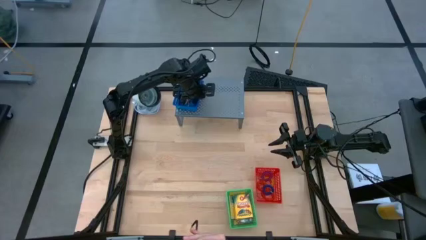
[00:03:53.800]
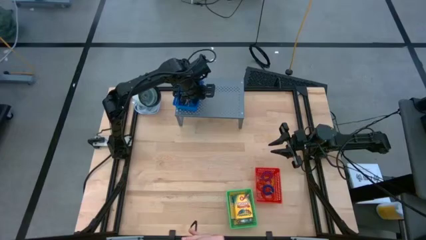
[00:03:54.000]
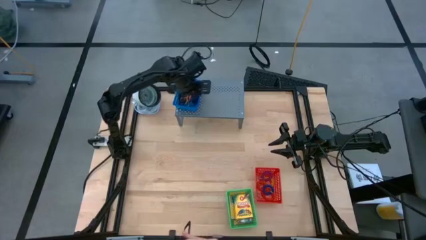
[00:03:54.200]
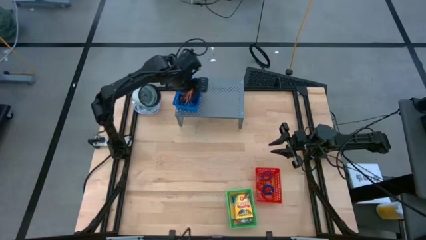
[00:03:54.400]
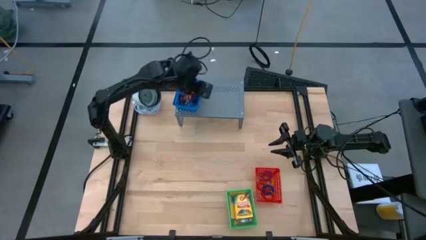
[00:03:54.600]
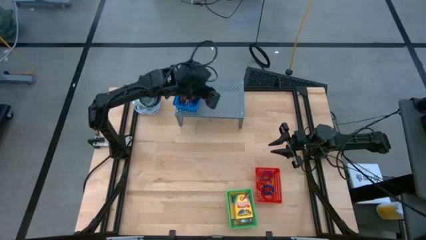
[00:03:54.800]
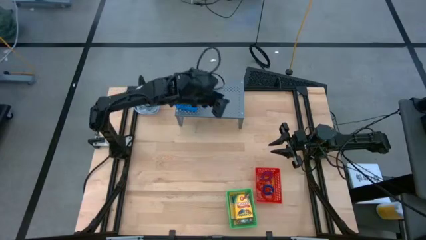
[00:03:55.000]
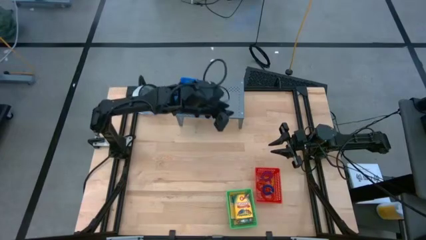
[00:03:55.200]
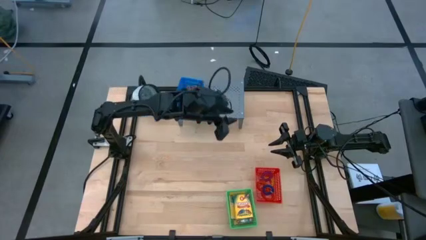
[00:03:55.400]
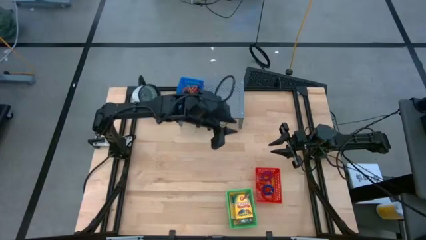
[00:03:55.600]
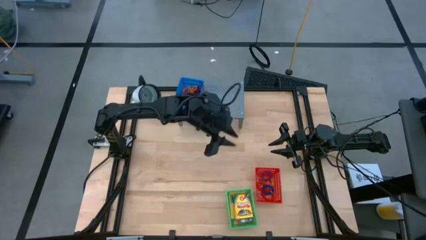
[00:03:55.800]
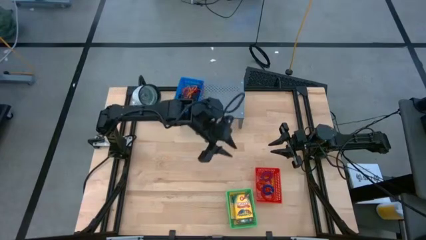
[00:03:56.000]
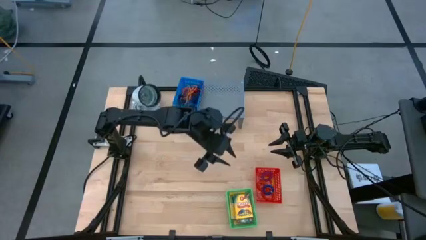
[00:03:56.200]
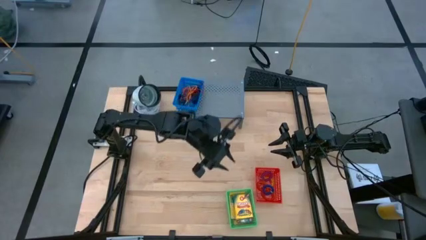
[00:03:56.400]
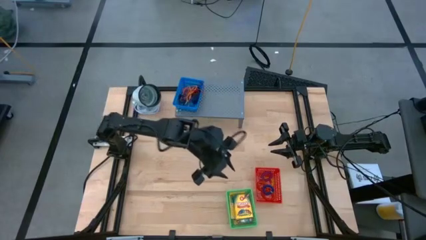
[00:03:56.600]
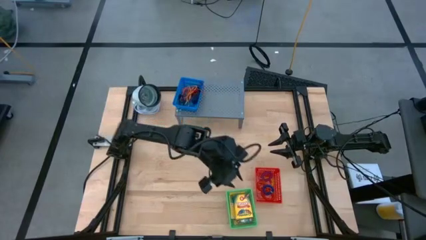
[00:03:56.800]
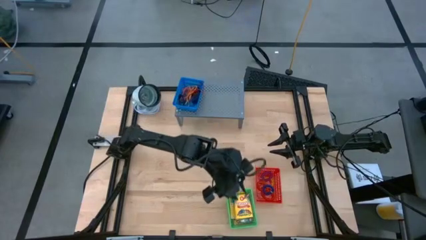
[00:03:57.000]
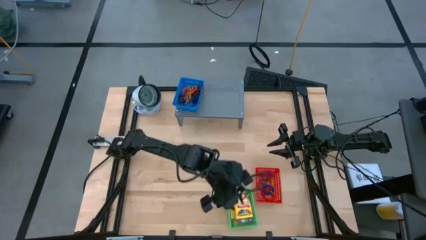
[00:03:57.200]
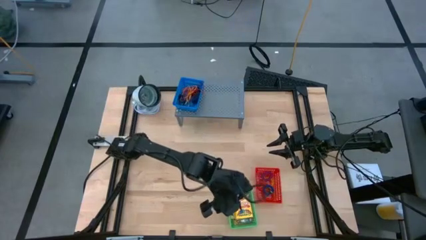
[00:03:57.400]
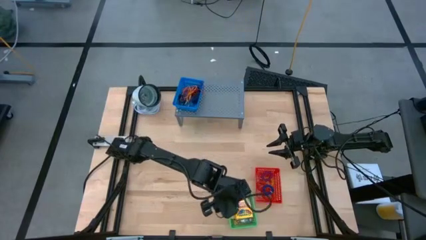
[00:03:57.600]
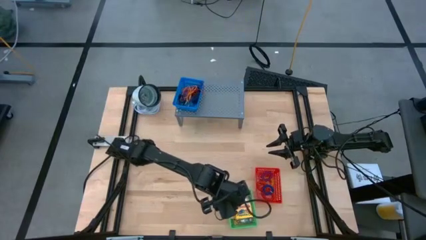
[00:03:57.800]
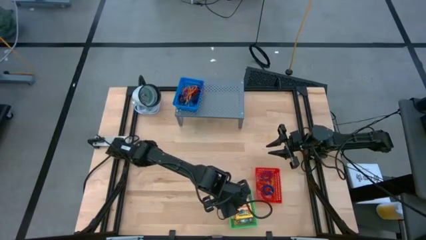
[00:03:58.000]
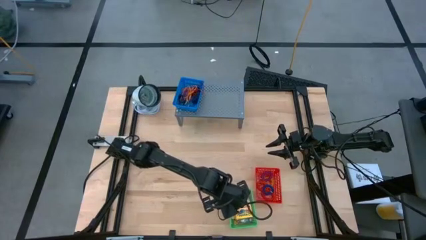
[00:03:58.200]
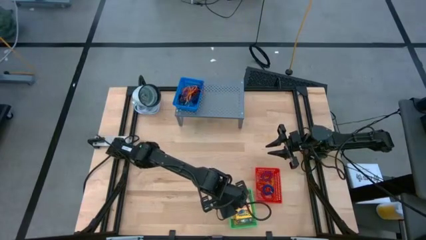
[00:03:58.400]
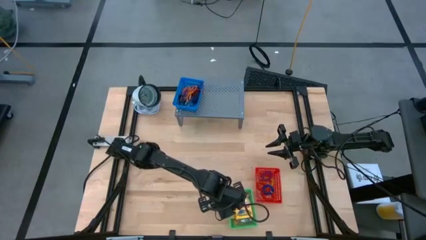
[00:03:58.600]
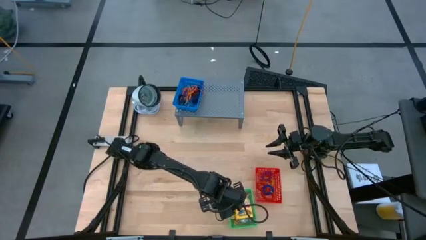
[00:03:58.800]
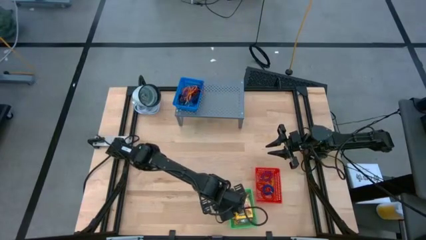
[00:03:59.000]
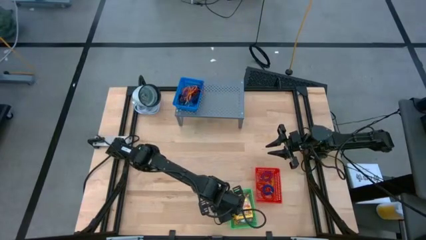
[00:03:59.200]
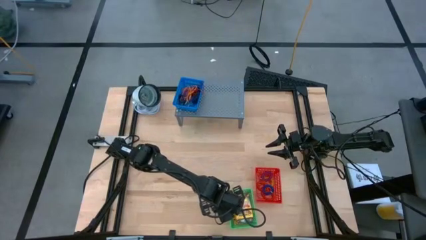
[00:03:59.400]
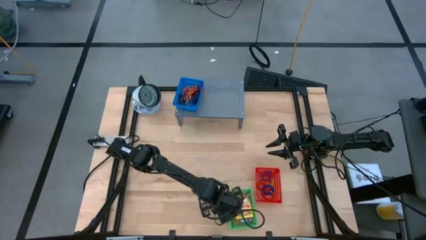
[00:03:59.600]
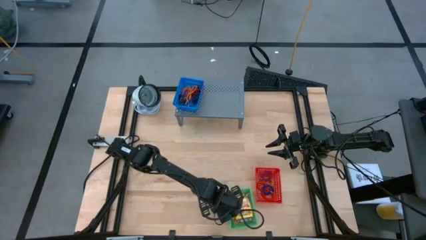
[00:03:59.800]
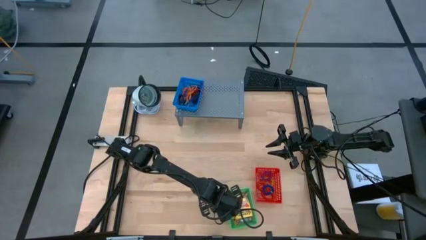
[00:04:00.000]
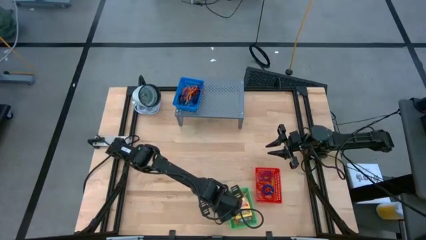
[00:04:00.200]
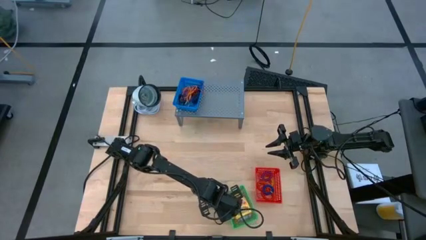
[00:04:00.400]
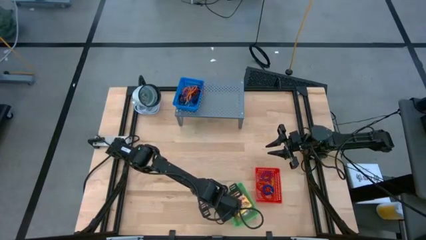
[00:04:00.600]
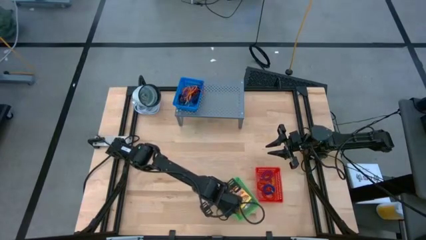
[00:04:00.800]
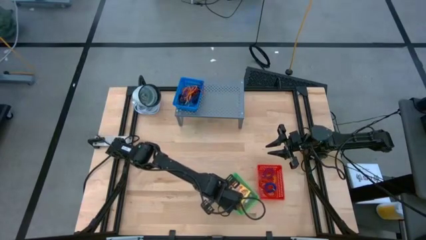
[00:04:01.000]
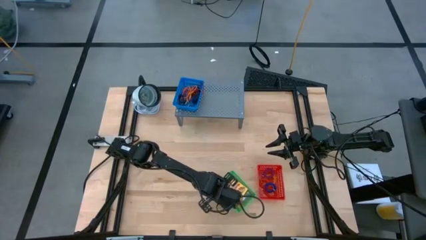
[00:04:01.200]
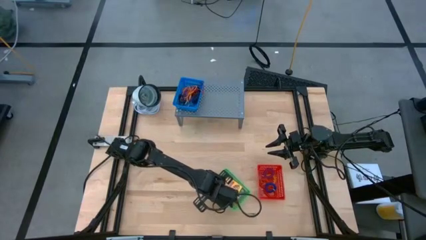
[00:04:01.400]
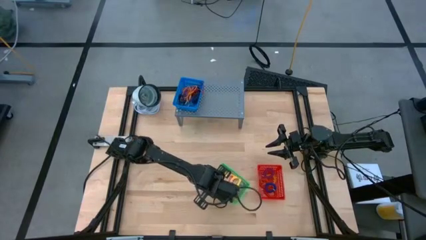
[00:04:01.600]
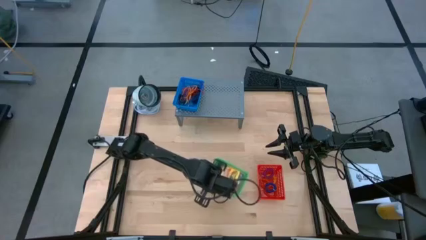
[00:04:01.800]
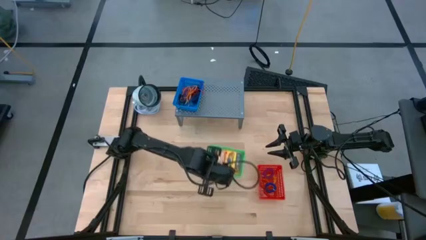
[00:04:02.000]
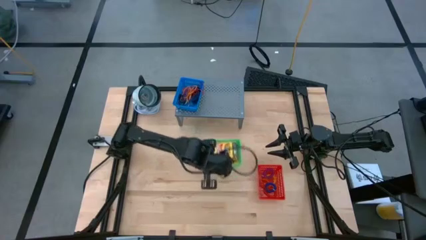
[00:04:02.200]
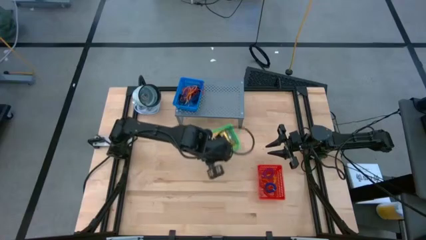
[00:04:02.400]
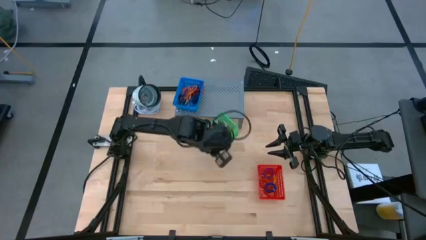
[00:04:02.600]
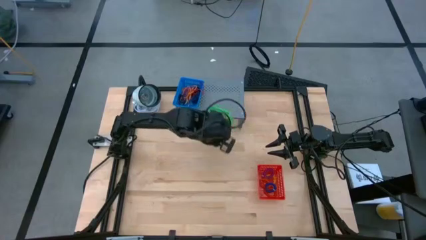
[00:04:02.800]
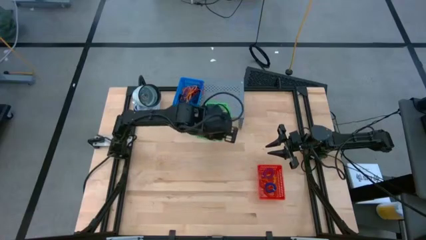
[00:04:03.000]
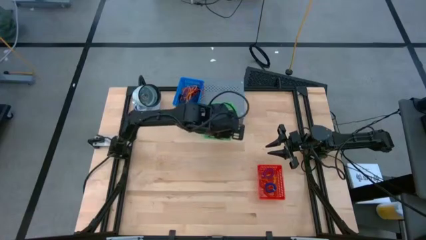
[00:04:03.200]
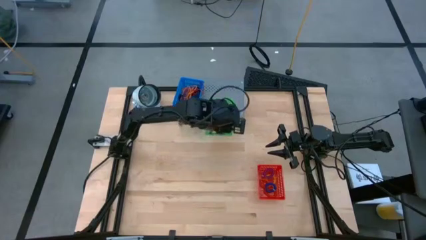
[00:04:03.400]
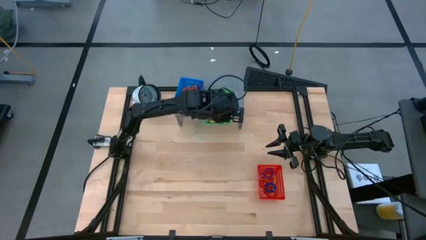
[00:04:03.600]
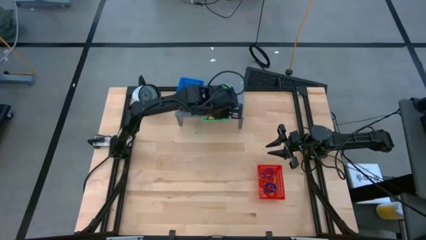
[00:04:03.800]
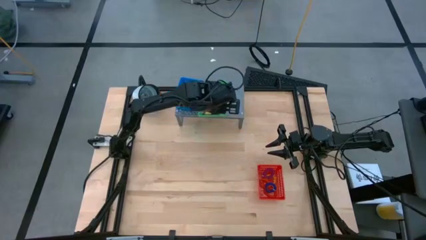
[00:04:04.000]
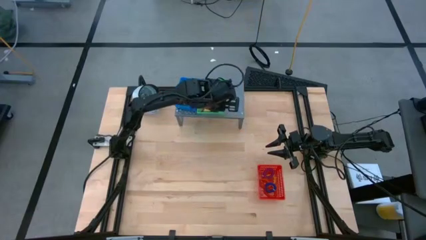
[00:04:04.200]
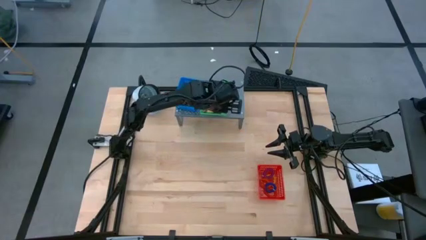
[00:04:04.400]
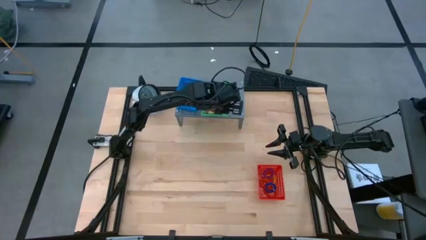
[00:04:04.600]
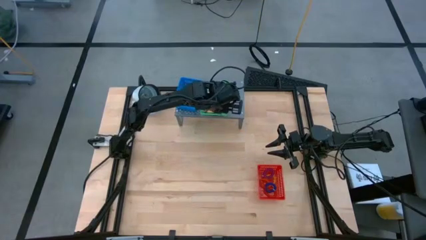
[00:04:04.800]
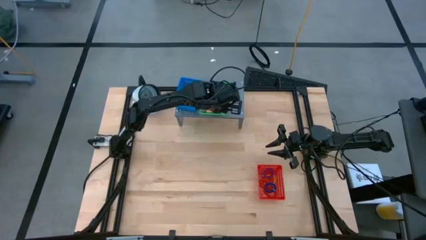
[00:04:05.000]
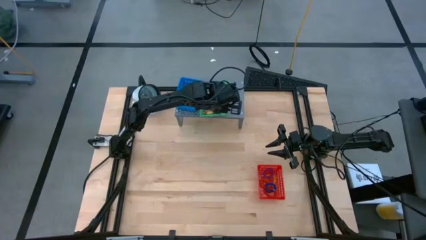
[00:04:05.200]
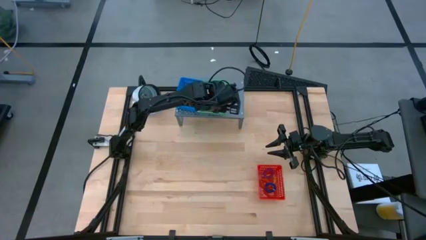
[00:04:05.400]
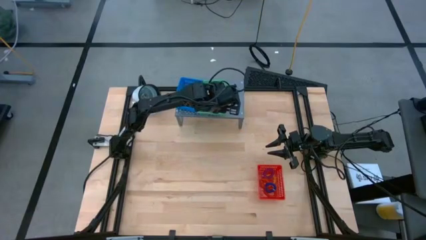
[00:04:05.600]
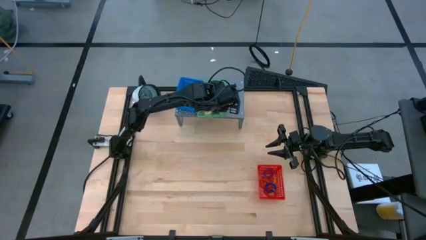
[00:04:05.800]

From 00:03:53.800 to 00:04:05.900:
Task: Pick & Place Office Desk Supplies
Put the green bin on the shelf
